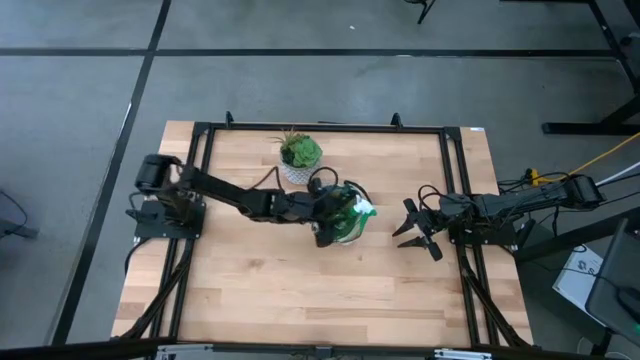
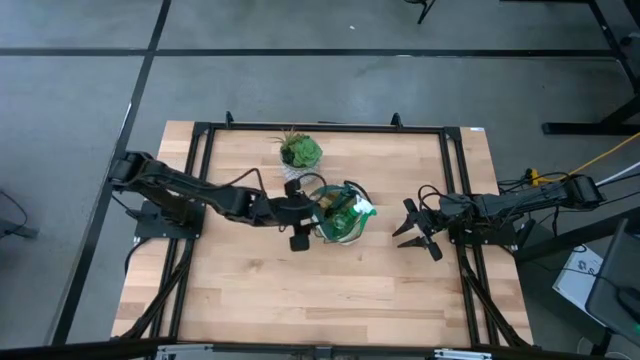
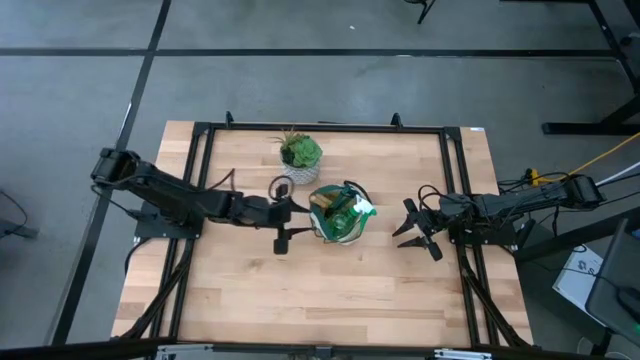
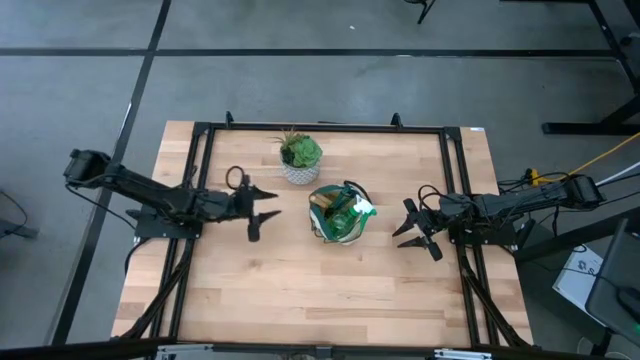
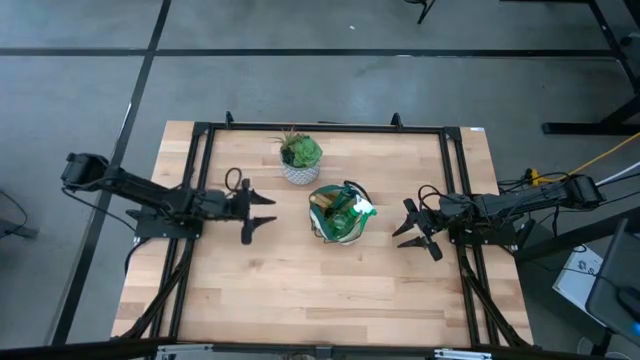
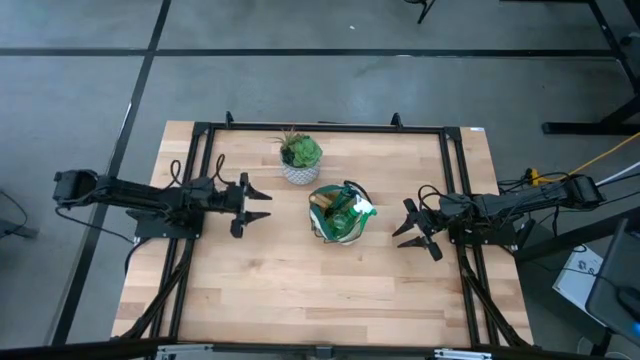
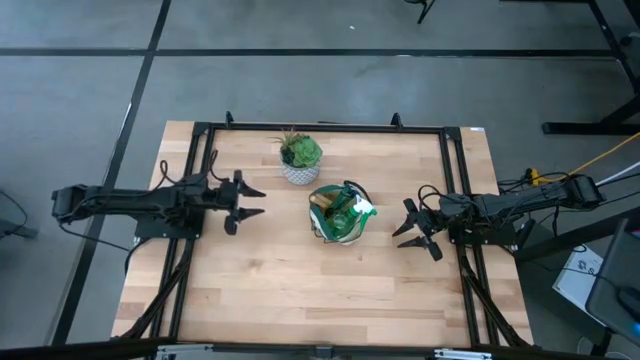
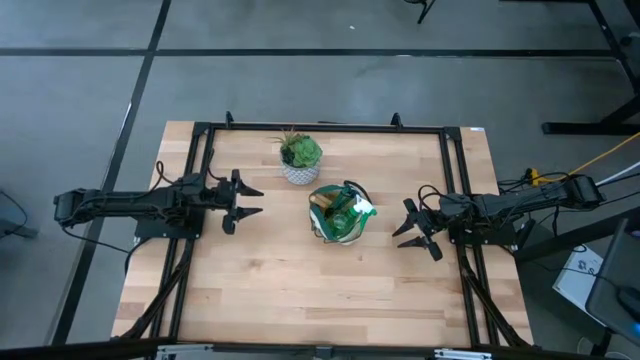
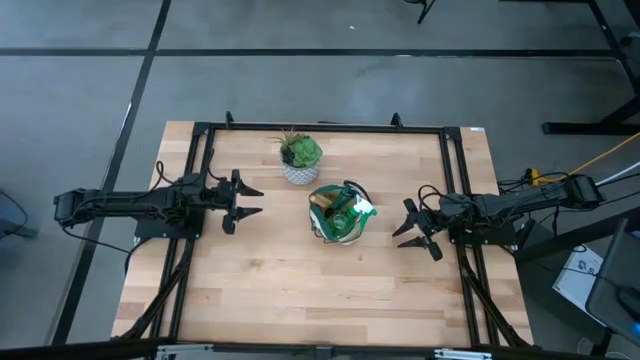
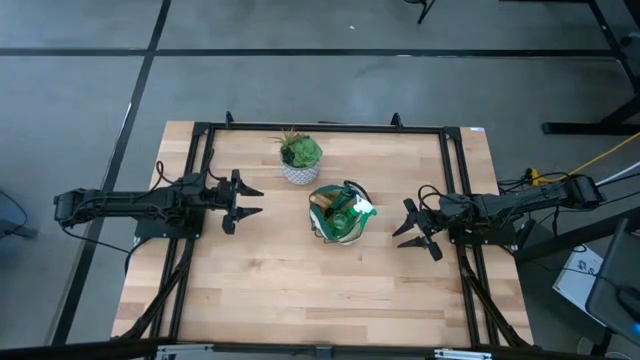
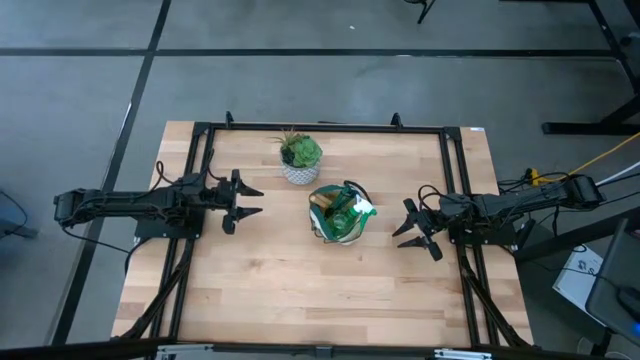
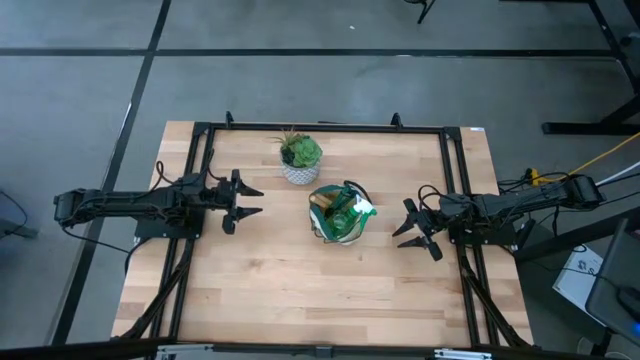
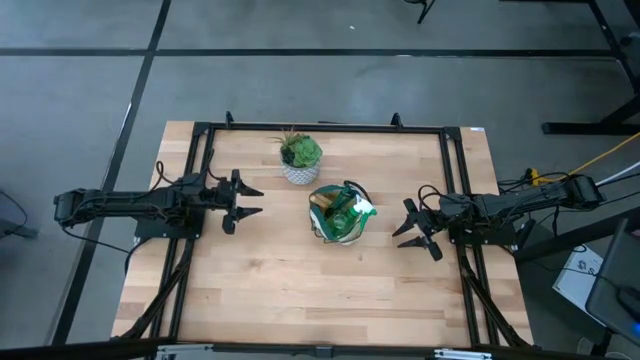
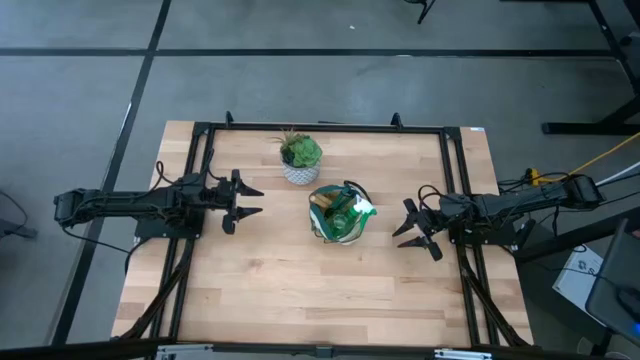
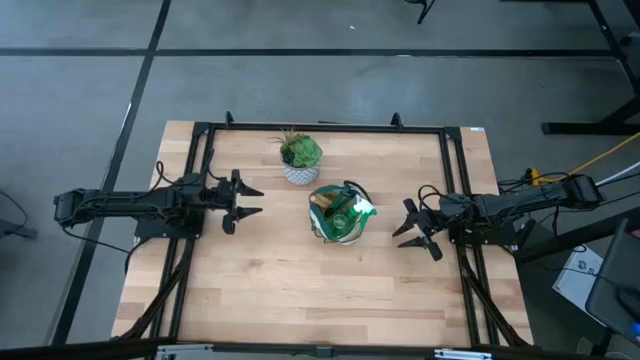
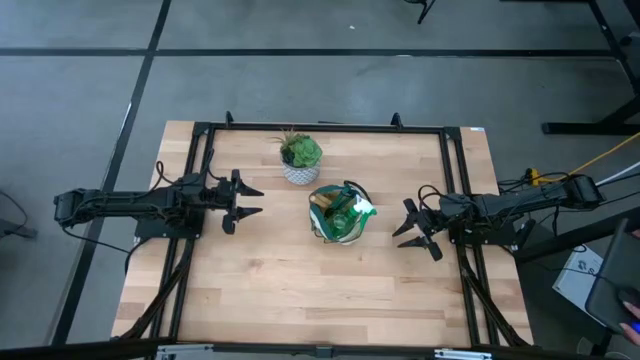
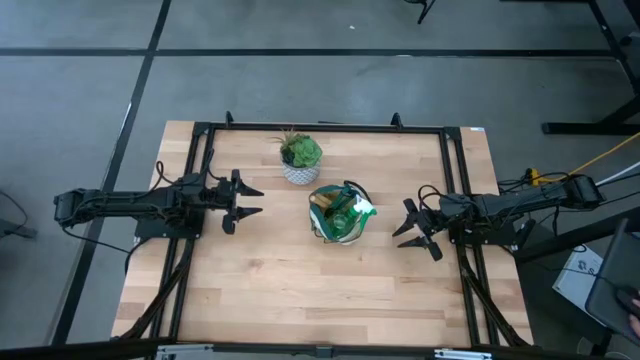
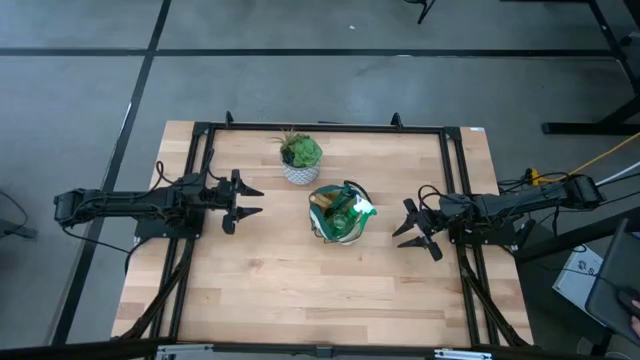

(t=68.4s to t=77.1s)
Task: Pick & Place Garden tools in Gardening bag
Return to Home Position

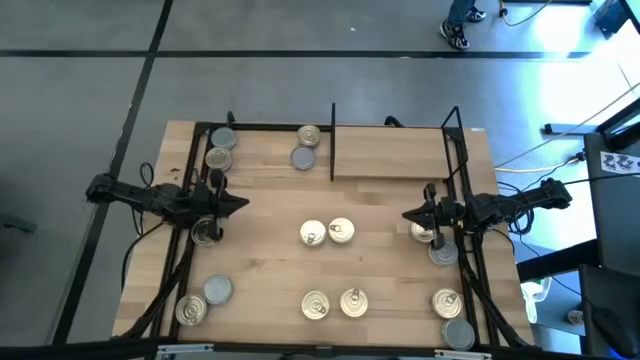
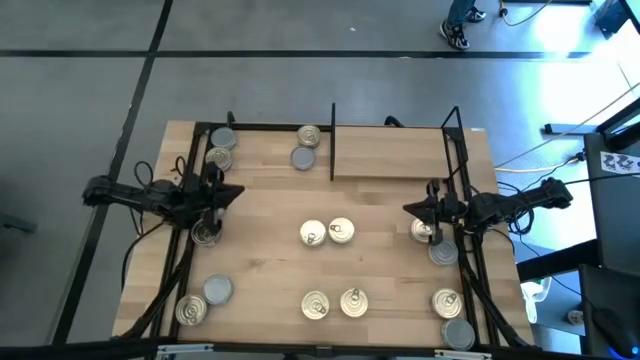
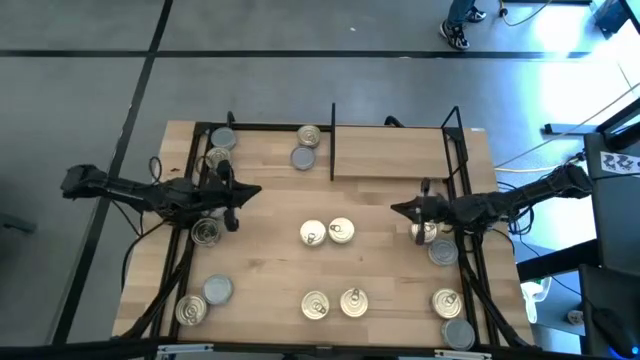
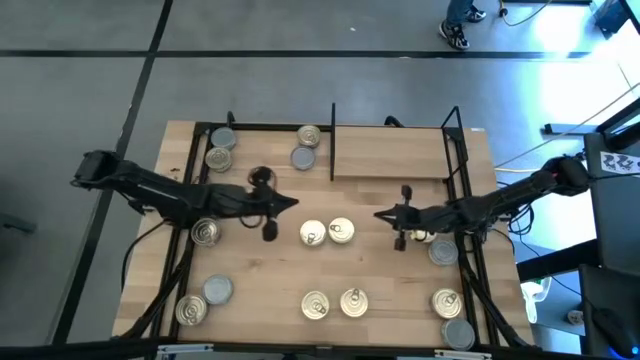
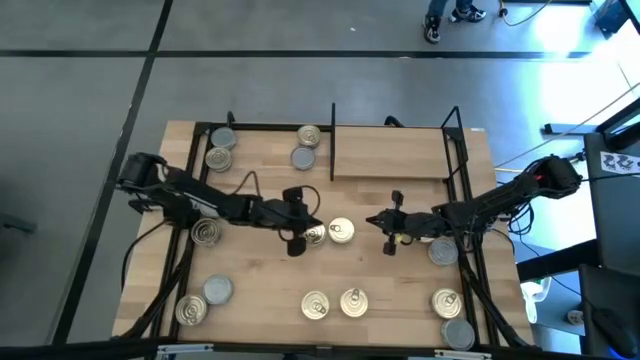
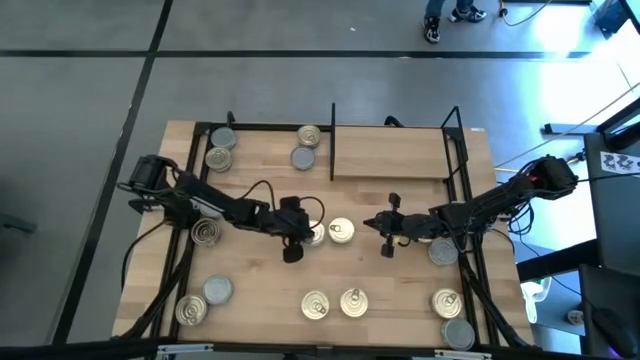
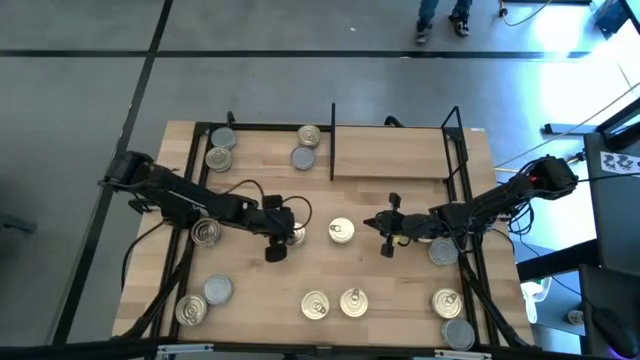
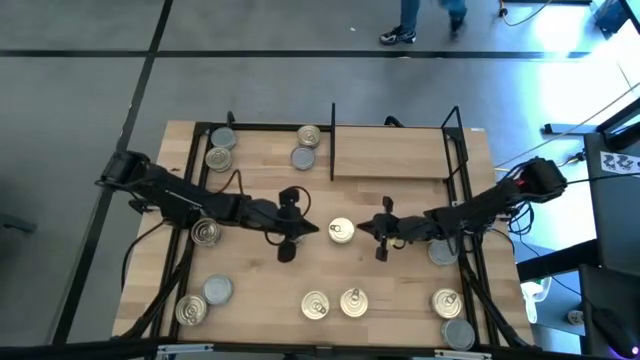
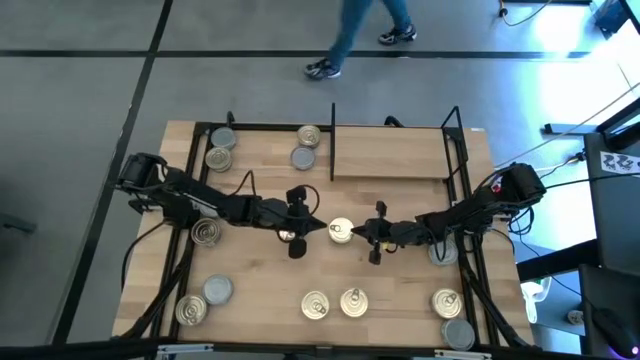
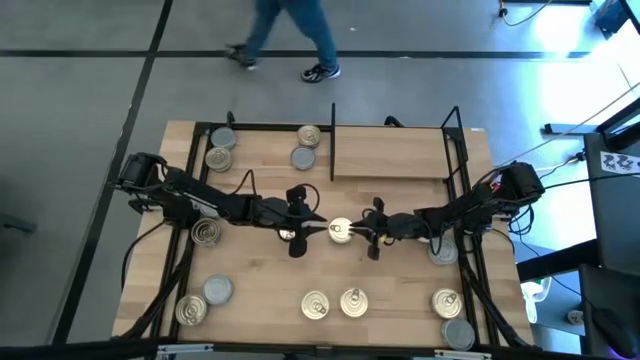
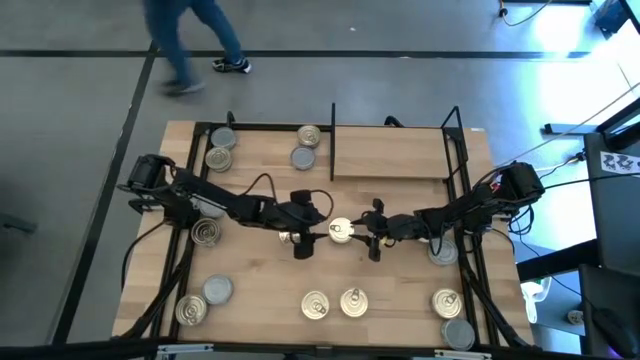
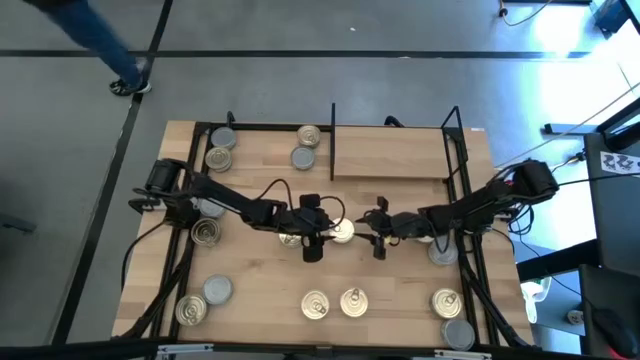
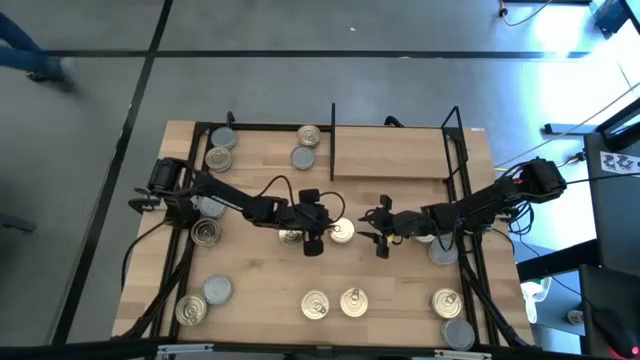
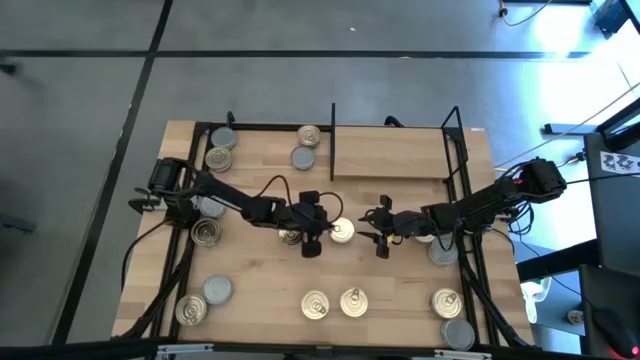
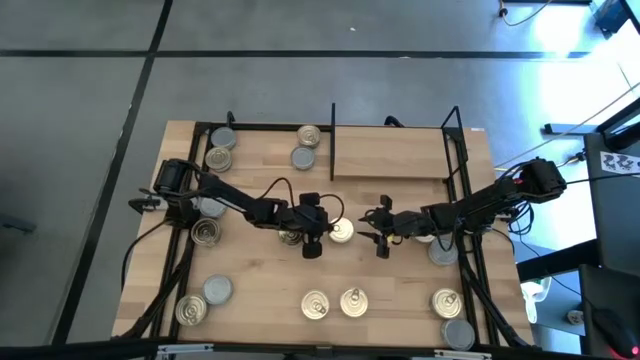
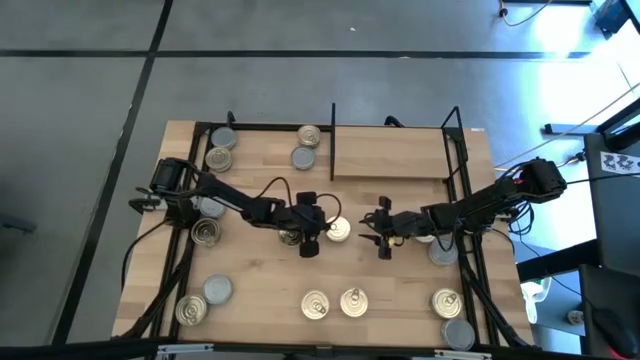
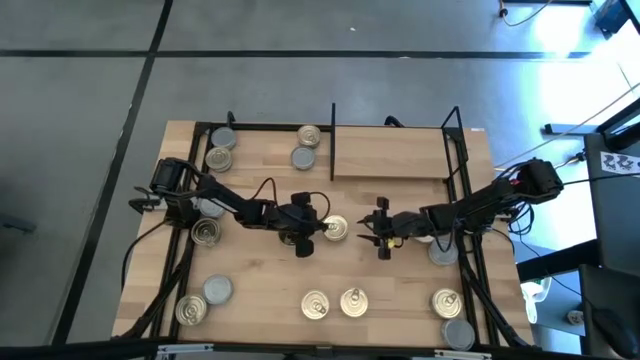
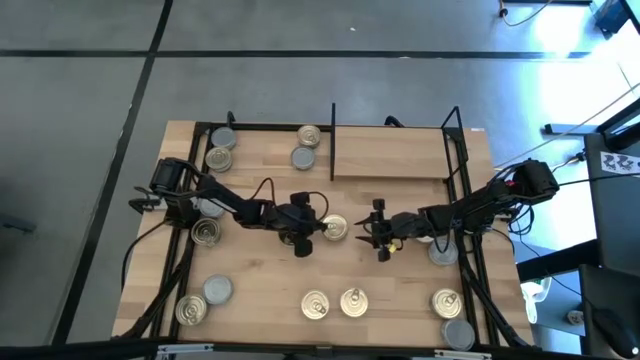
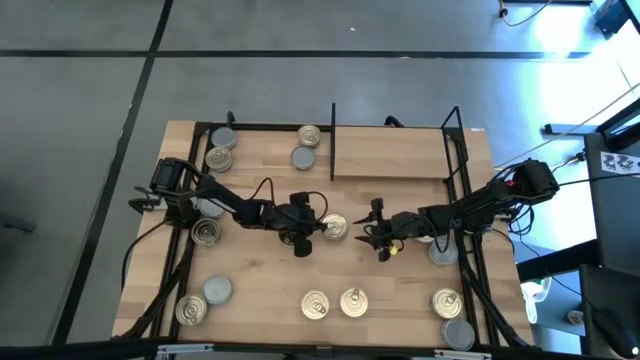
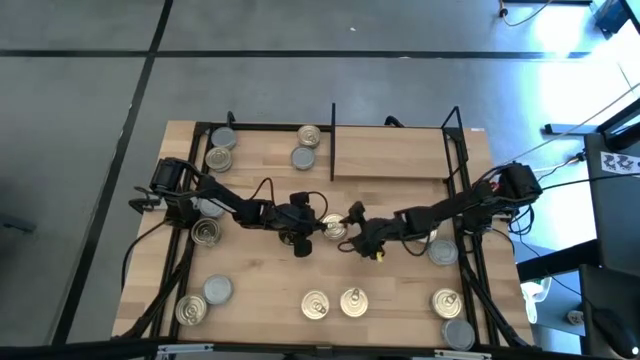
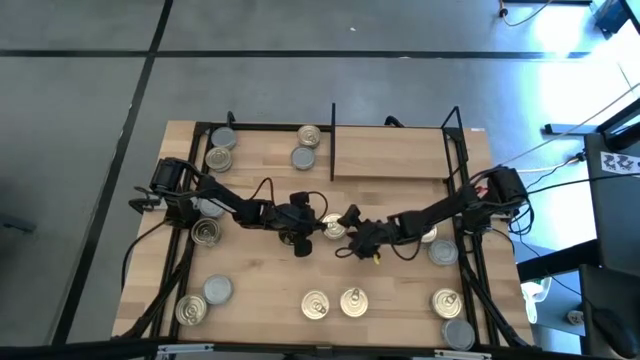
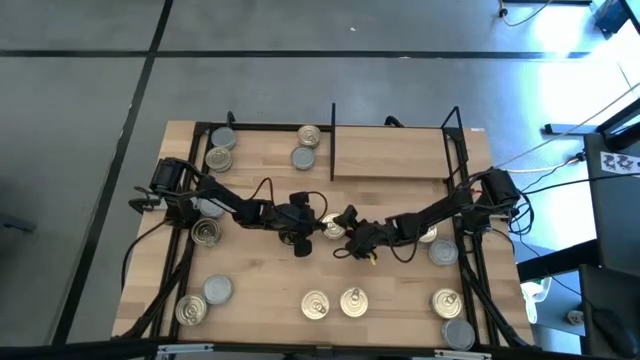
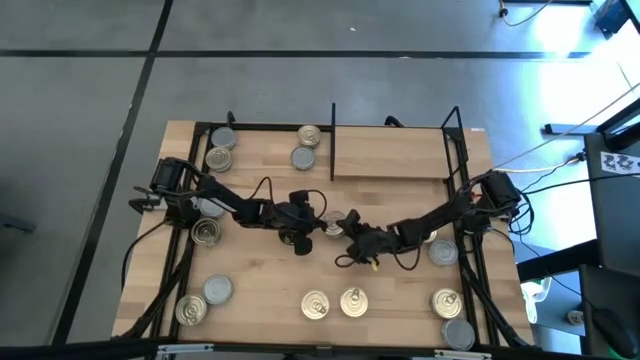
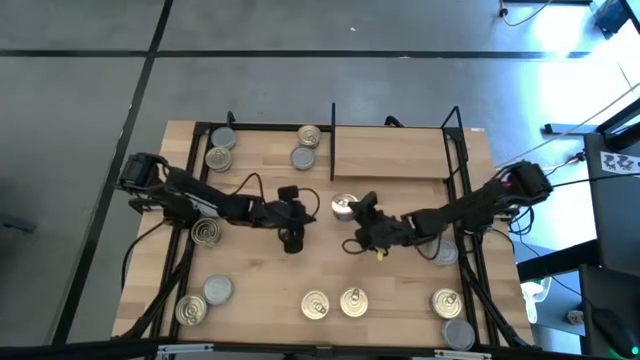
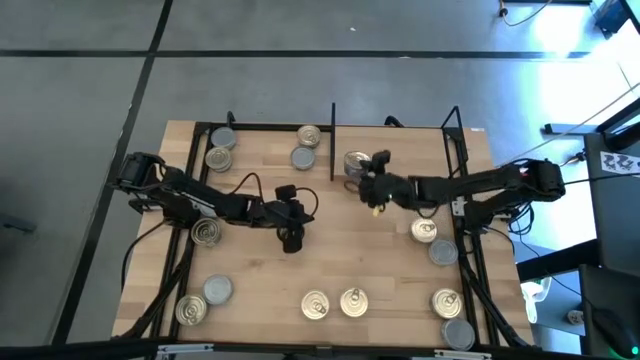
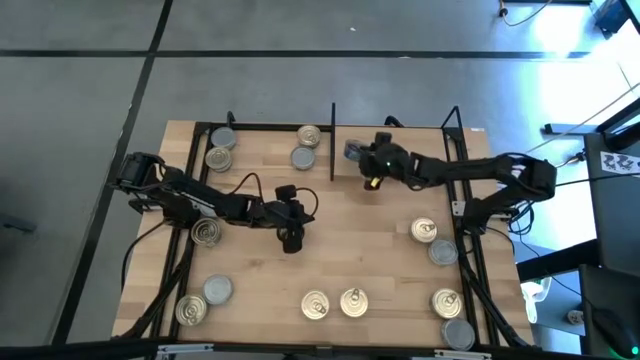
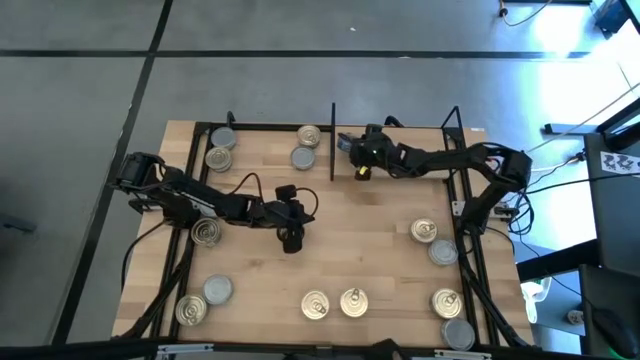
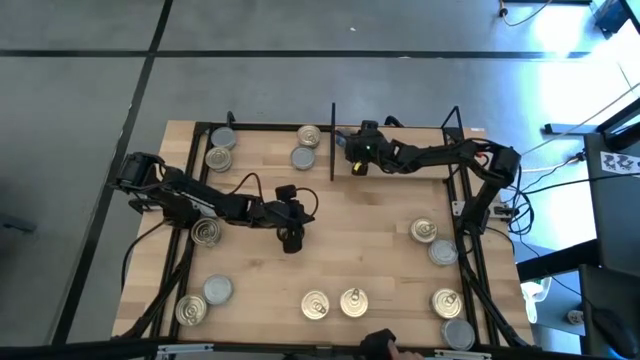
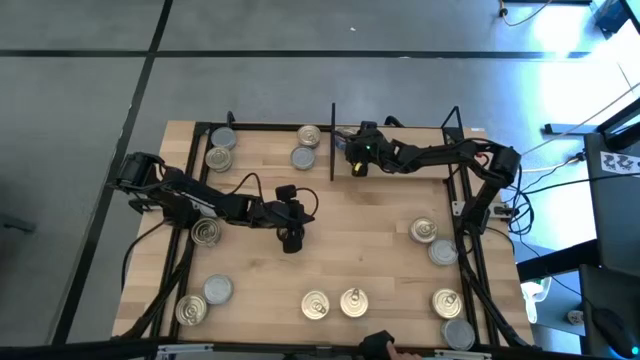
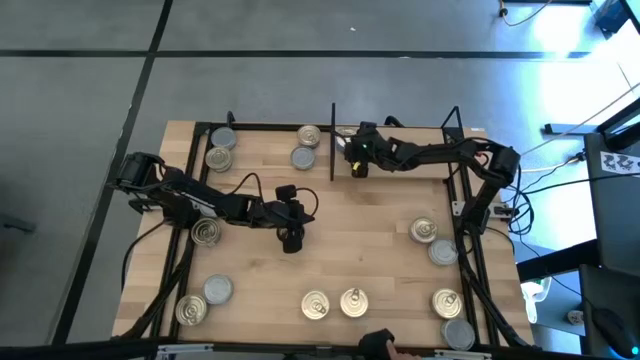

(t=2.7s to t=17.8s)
Task: Stack canned seafood by type on shelf
Put the blue tuna can on the shelf
